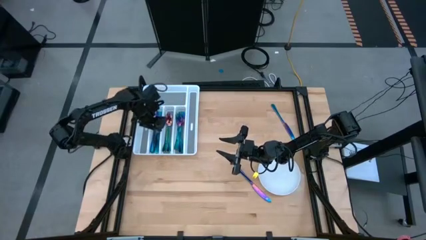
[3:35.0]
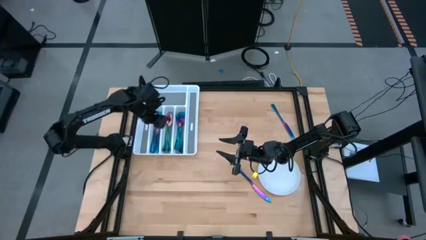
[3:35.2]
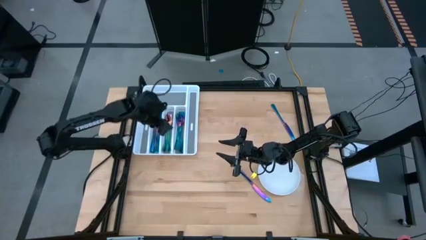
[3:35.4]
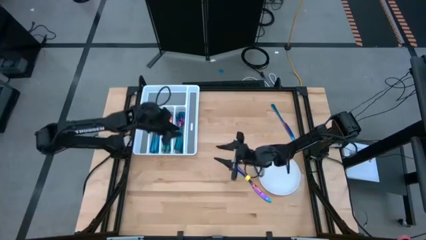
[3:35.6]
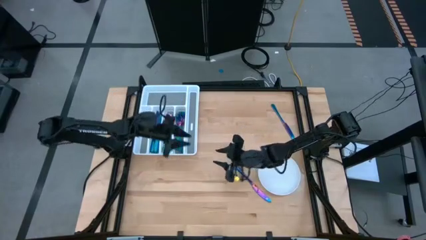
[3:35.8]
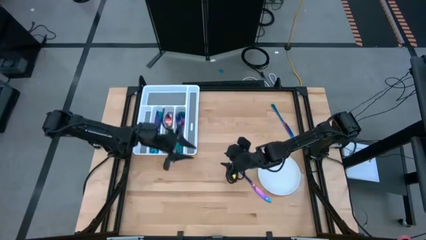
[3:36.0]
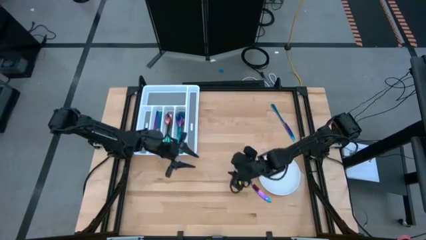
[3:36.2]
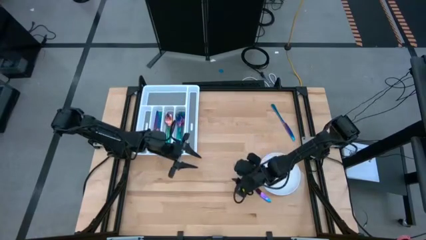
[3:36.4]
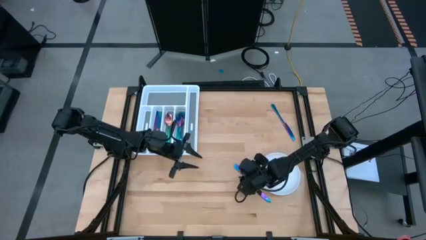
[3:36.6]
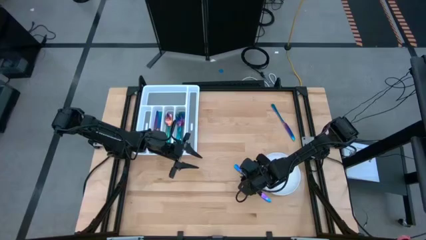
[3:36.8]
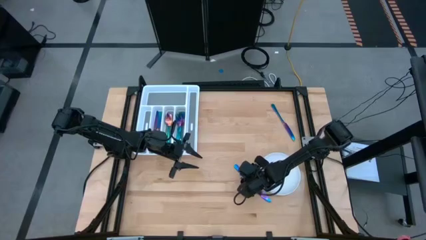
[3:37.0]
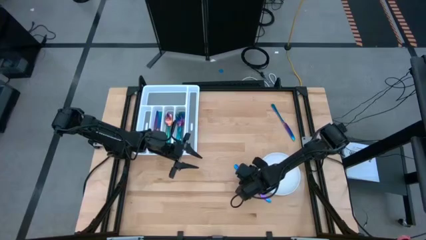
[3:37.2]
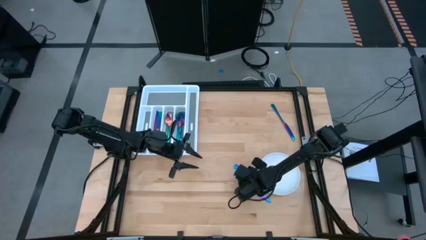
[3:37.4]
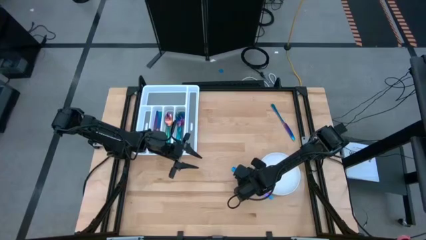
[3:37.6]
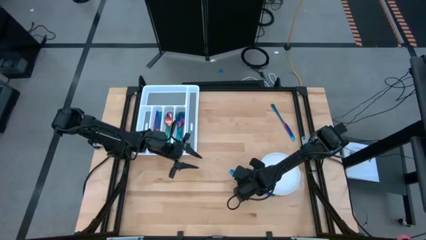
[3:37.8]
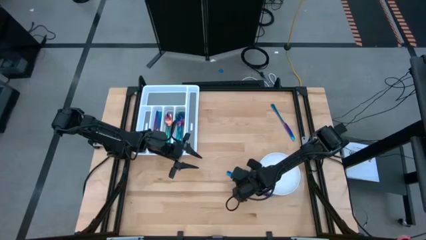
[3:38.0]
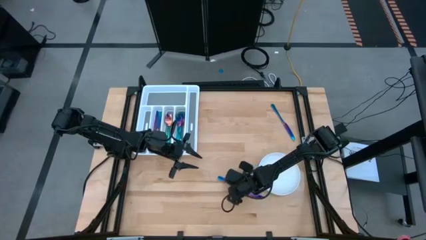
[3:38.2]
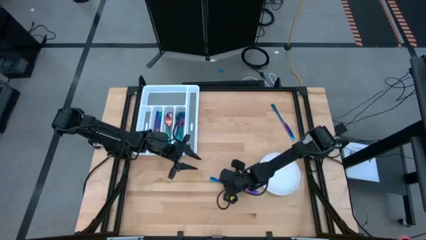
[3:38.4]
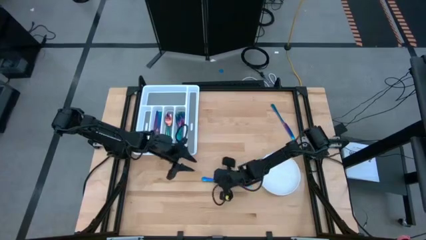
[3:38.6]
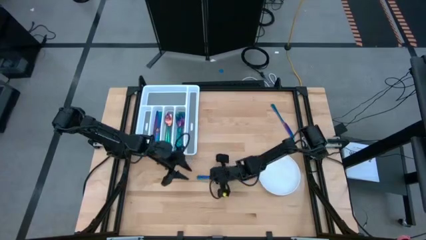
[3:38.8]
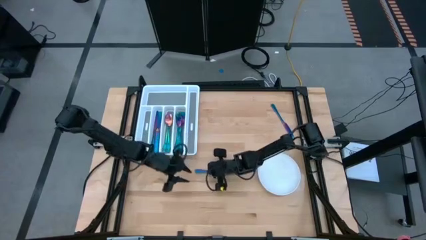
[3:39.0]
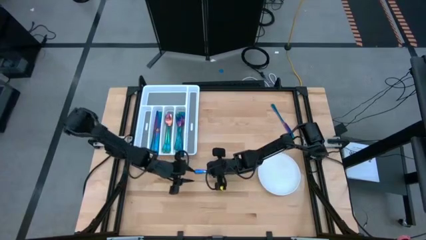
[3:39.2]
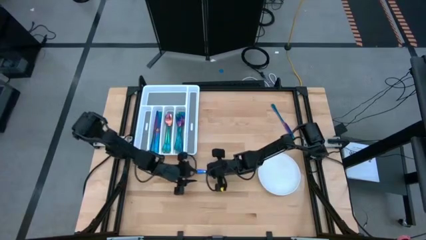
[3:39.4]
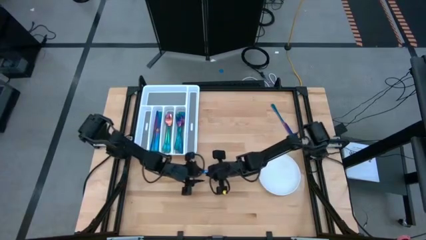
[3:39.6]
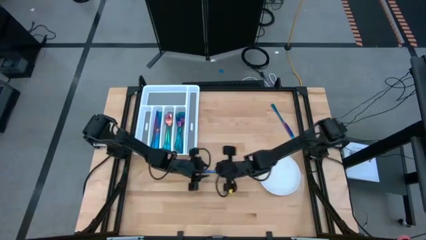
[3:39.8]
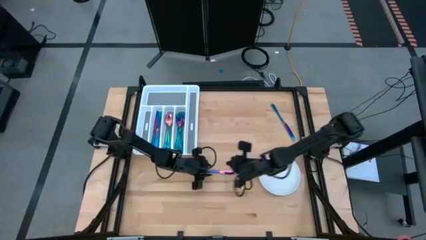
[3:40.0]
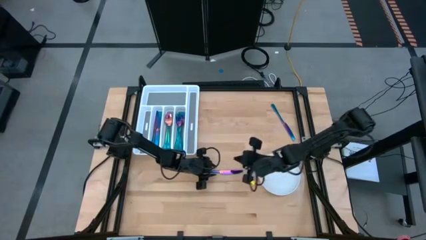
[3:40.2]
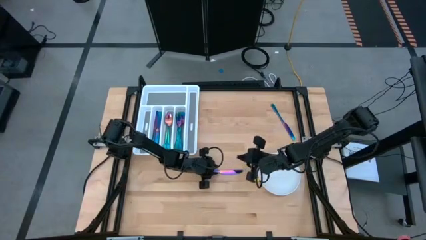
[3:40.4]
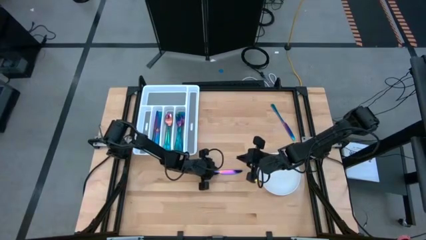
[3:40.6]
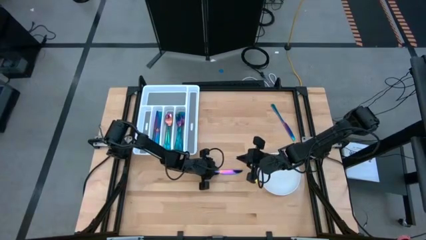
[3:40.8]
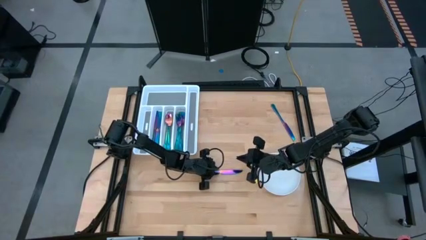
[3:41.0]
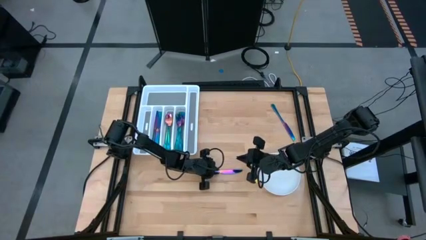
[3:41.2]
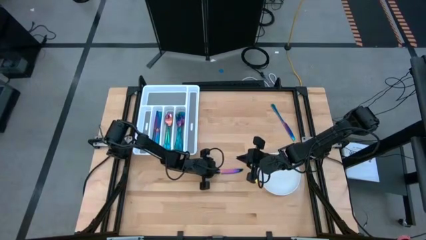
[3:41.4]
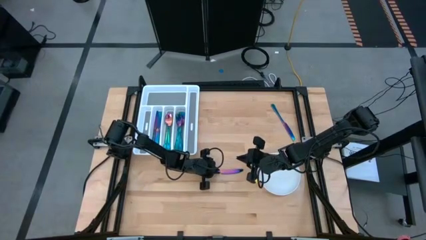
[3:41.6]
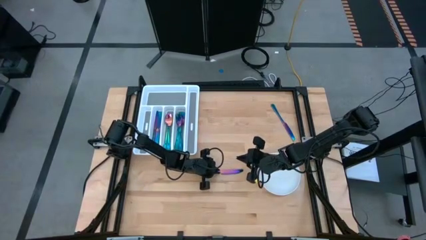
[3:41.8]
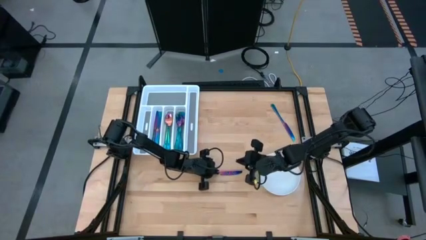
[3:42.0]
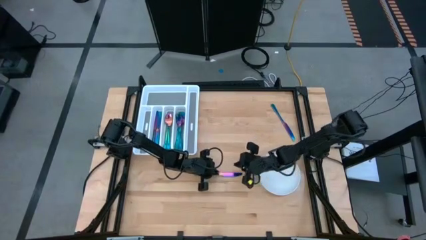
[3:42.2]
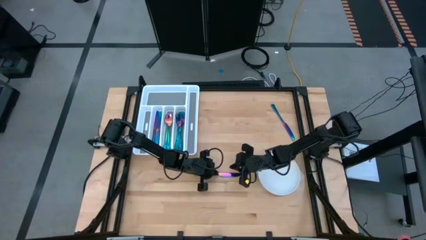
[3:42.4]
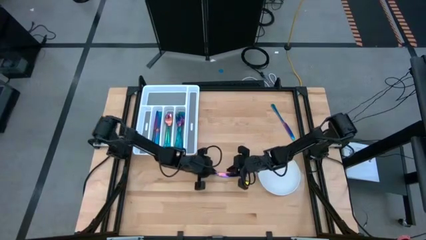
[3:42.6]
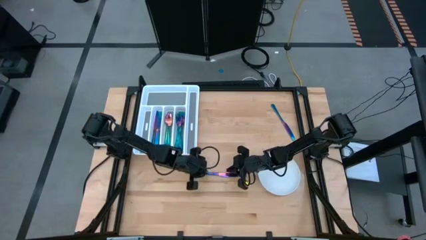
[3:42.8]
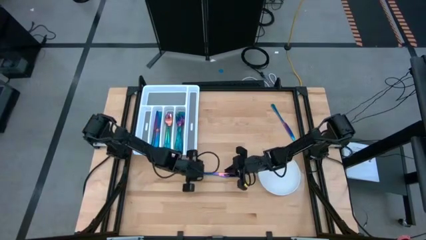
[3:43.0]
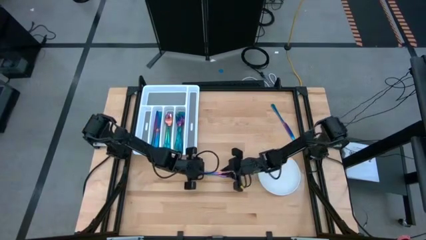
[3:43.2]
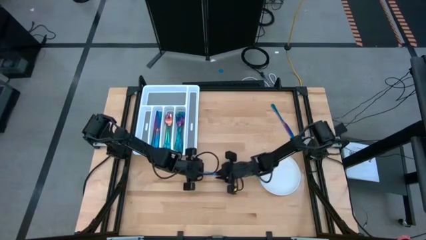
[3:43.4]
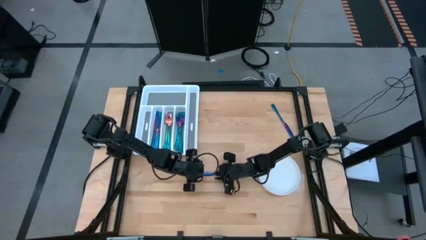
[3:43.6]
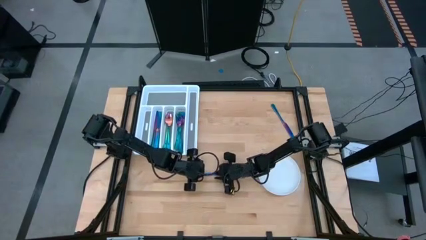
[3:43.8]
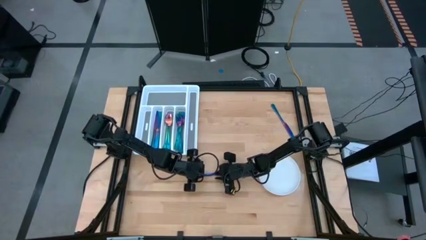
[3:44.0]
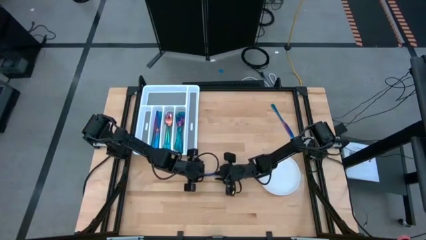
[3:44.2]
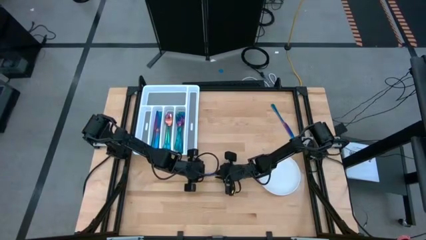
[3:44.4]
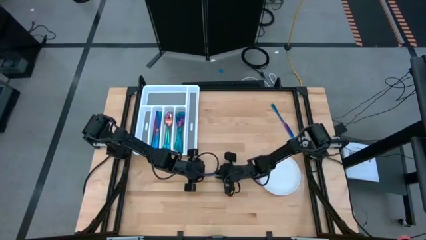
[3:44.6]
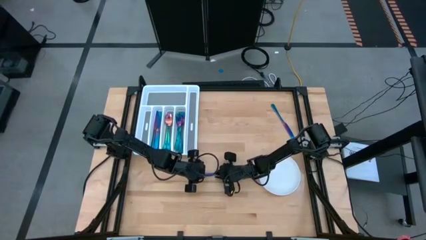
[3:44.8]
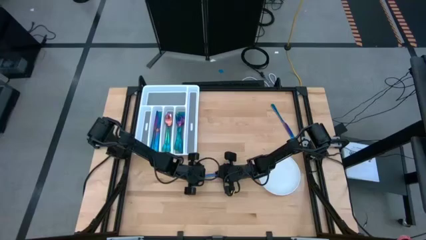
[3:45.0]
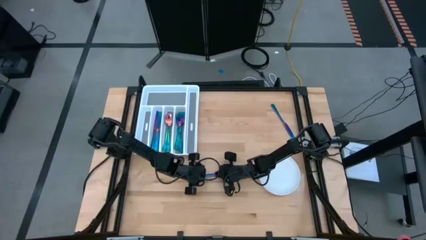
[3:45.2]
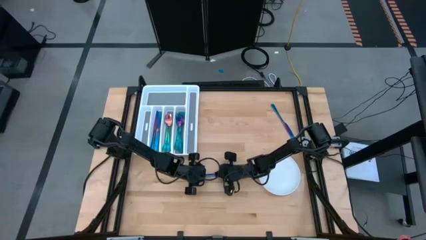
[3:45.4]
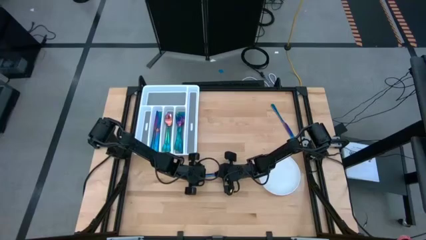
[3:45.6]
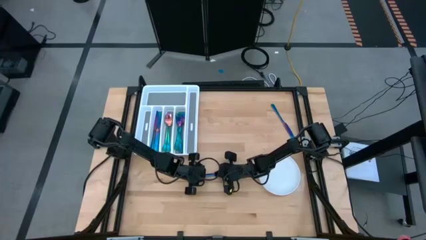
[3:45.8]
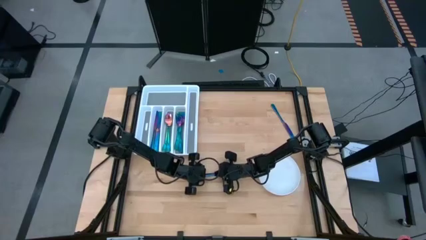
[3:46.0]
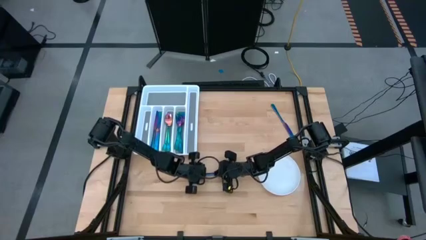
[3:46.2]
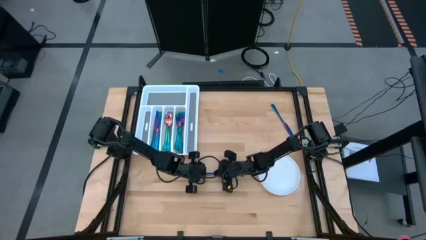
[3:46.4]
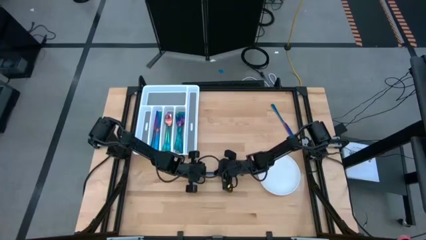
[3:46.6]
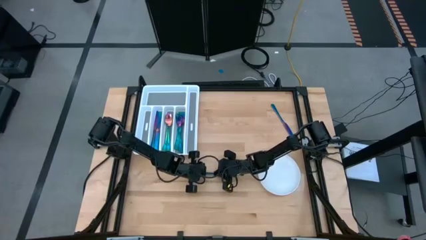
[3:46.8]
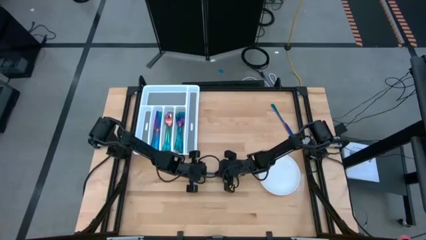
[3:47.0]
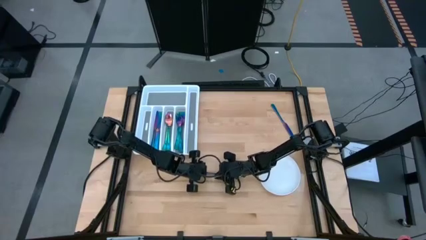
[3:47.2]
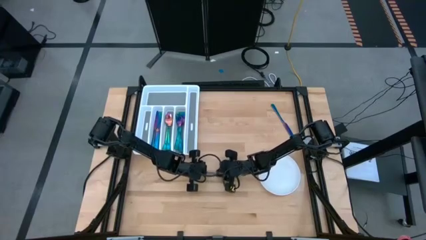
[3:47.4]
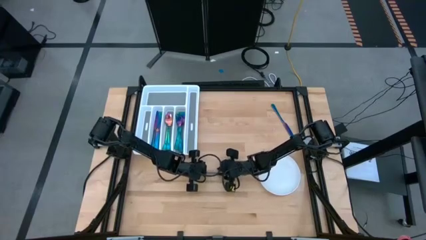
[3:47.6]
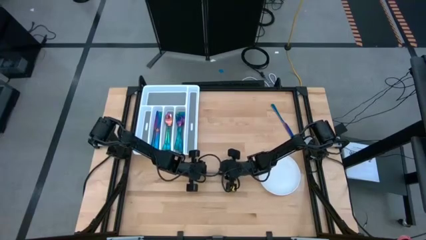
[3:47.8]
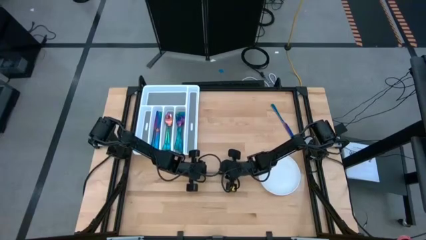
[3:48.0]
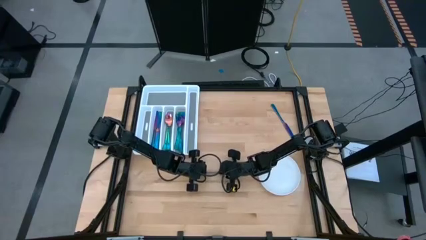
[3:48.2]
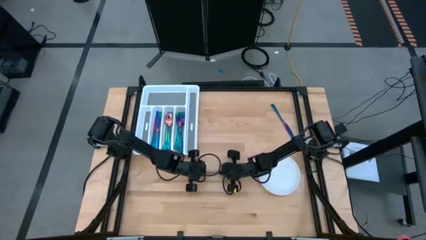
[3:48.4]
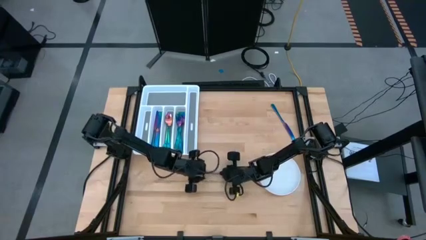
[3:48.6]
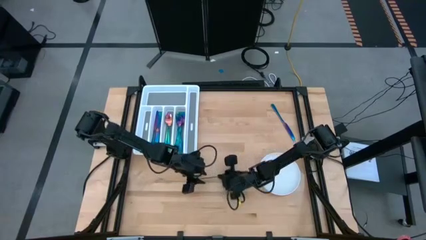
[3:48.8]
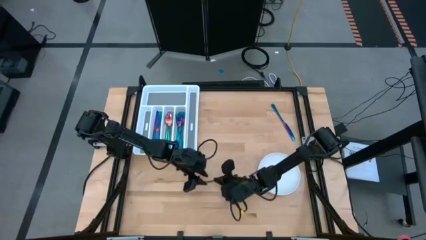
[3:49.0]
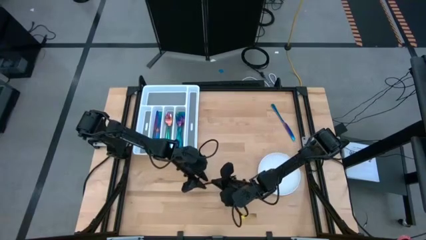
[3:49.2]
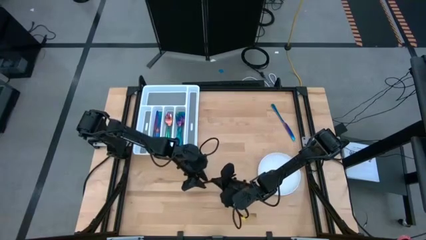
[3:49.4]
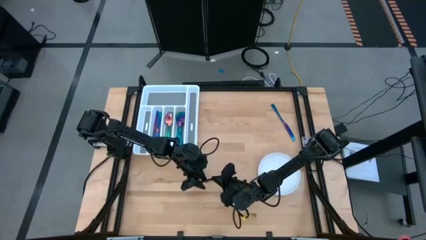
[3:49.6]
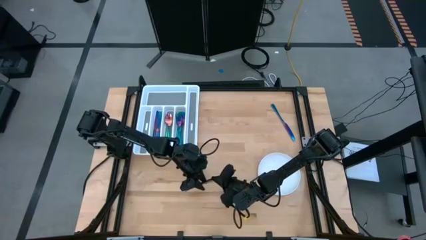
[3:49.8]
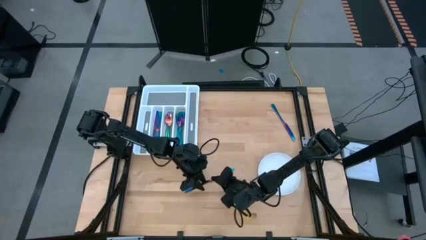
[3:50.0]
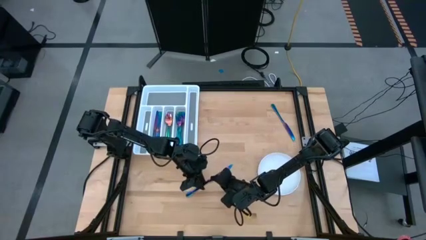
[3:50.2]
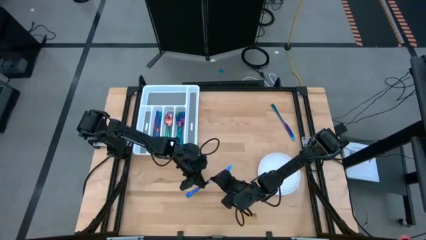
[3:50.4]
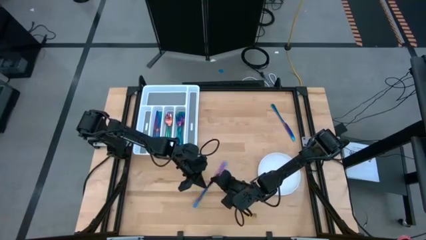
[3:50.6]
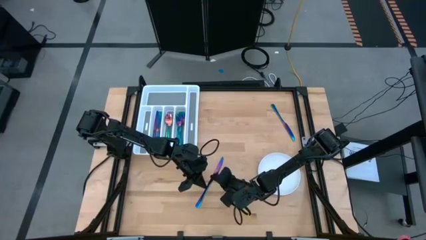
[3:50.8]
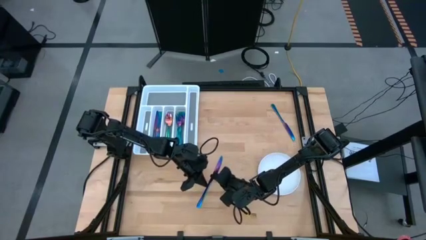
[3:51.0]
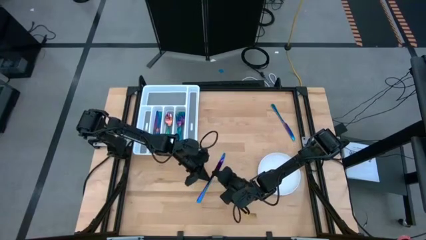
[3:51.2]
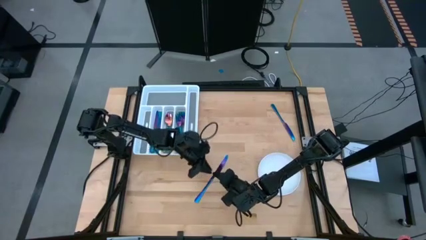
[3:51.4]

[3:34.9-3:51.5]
Task: Sort silverware
Put the iridescent knife into the white silverware tray
